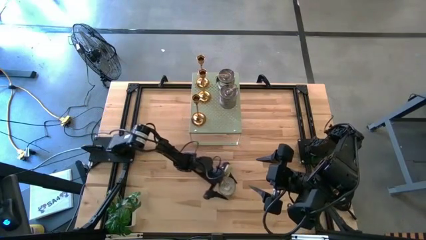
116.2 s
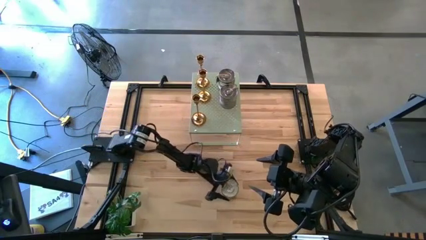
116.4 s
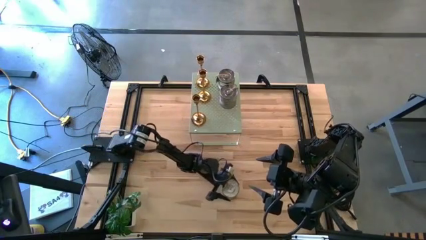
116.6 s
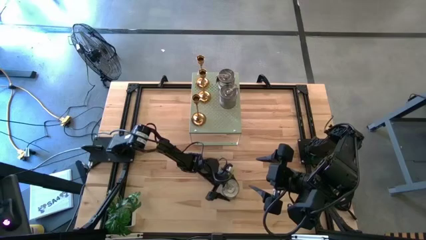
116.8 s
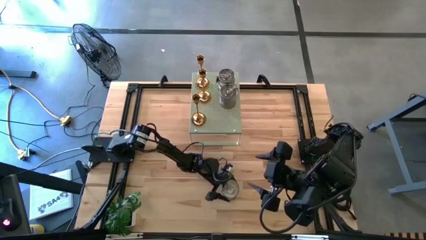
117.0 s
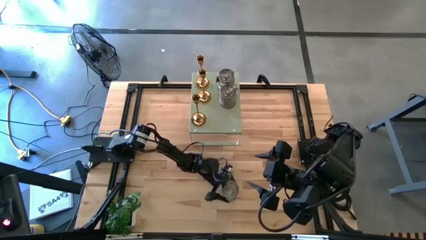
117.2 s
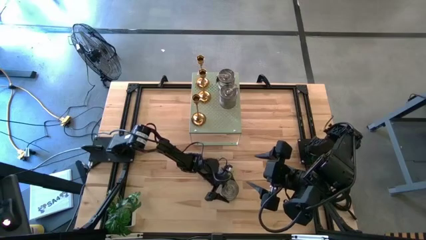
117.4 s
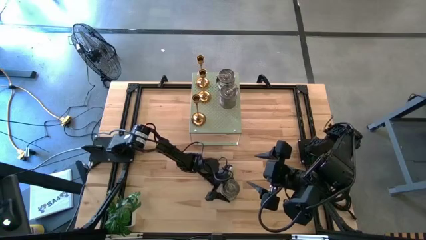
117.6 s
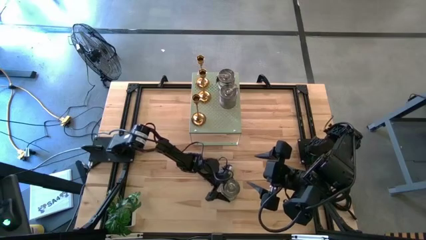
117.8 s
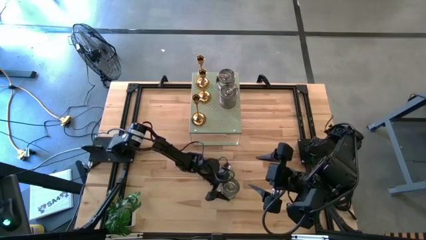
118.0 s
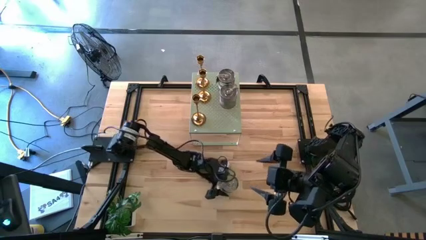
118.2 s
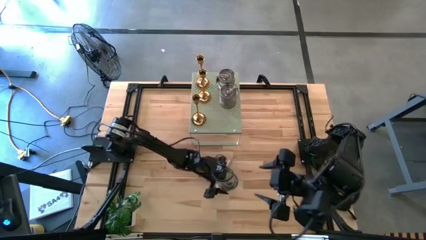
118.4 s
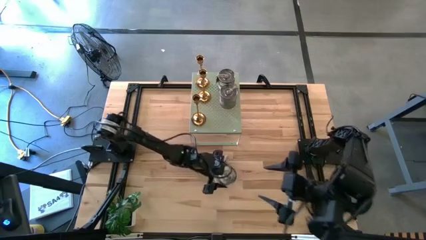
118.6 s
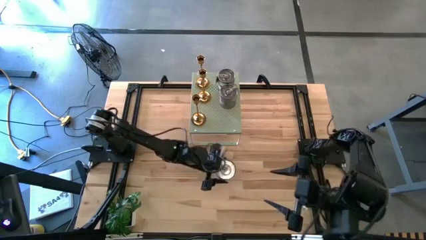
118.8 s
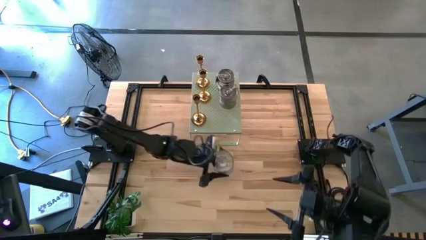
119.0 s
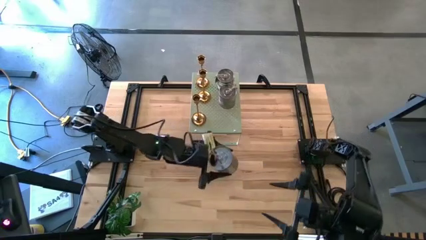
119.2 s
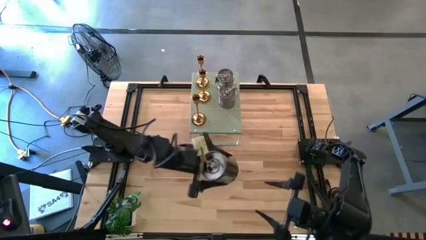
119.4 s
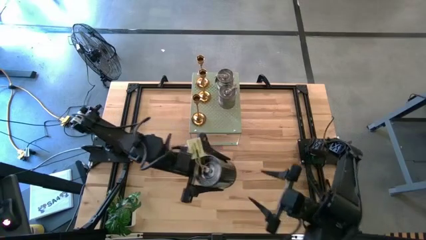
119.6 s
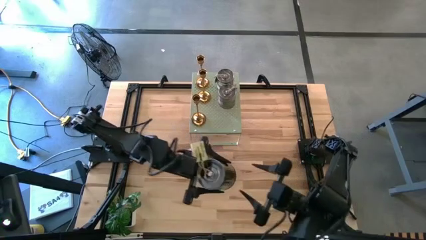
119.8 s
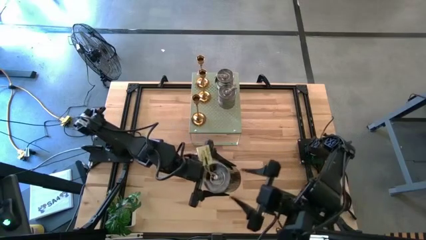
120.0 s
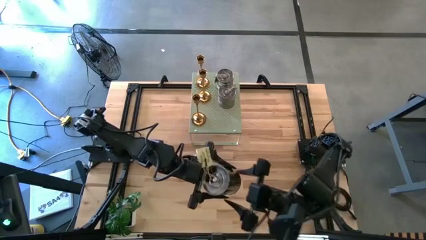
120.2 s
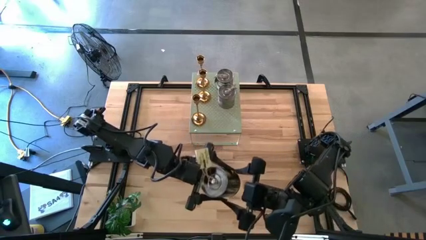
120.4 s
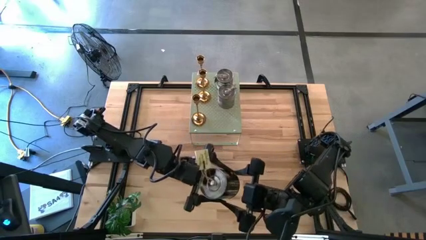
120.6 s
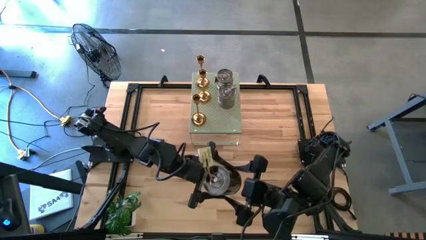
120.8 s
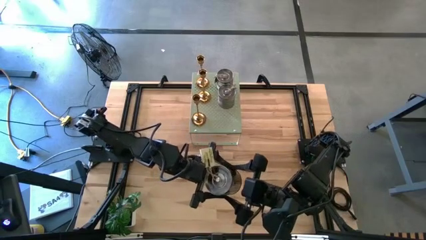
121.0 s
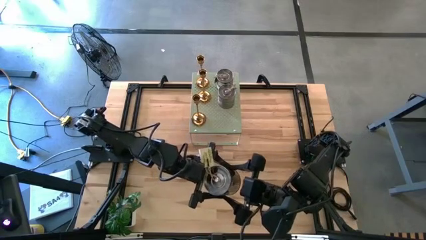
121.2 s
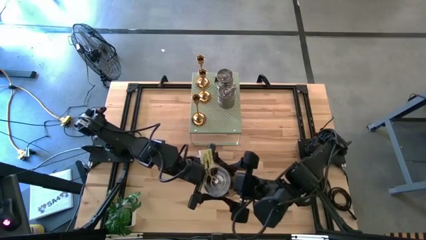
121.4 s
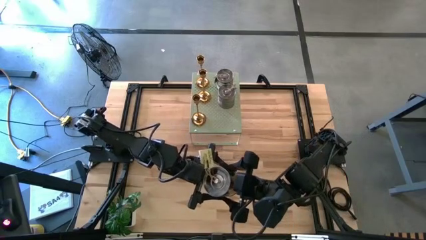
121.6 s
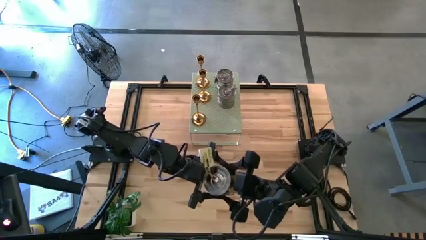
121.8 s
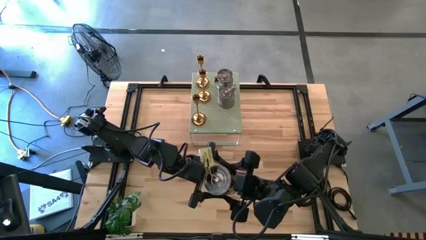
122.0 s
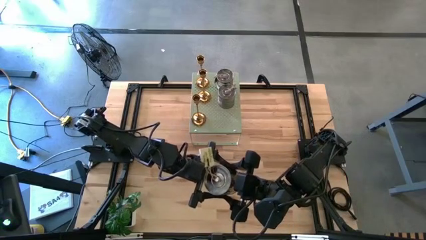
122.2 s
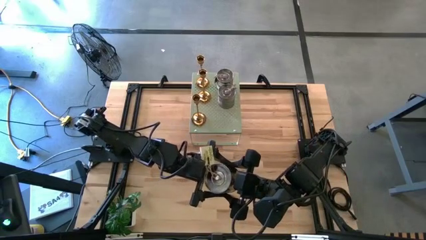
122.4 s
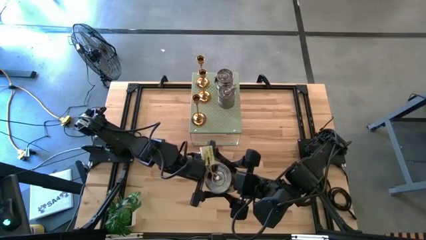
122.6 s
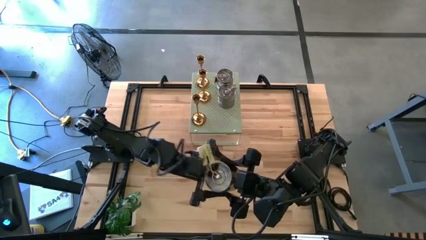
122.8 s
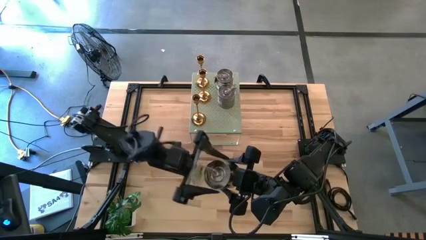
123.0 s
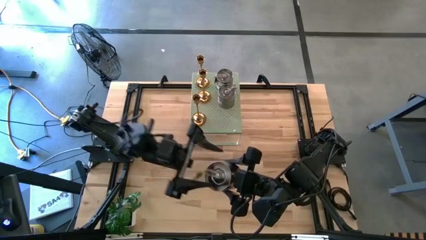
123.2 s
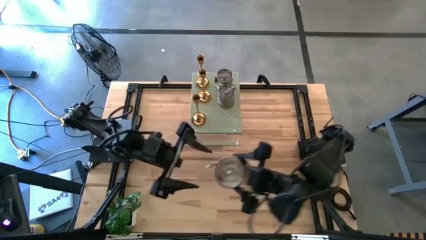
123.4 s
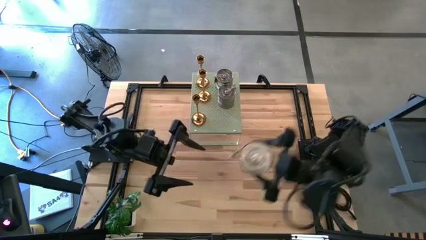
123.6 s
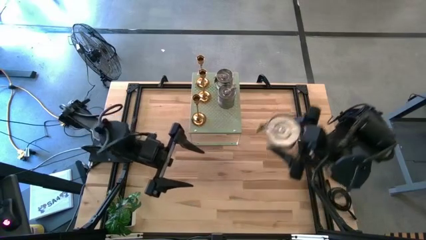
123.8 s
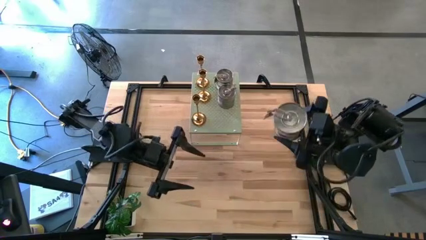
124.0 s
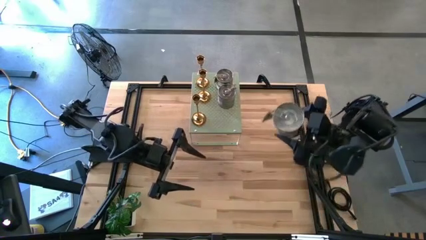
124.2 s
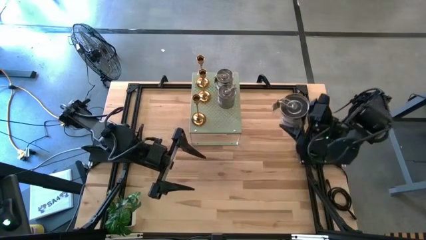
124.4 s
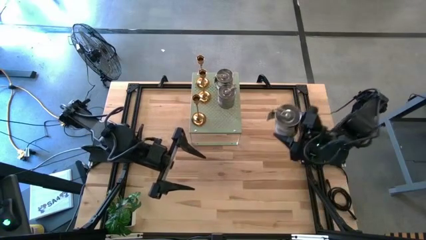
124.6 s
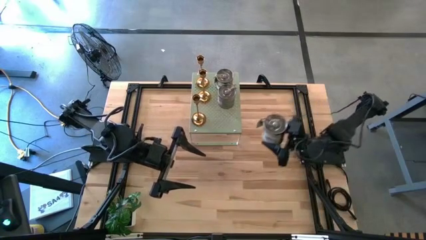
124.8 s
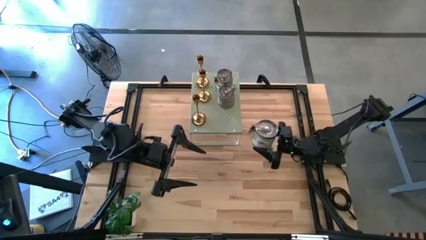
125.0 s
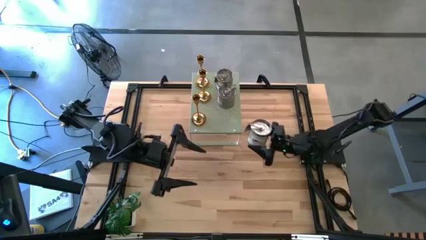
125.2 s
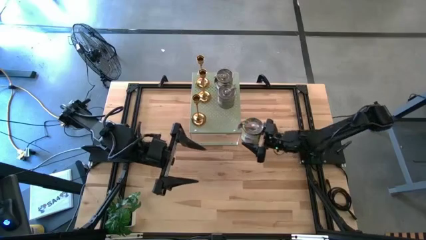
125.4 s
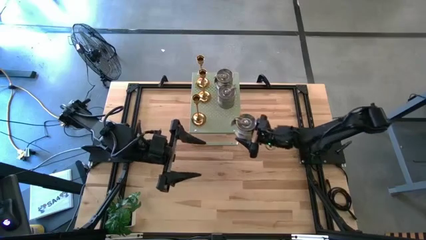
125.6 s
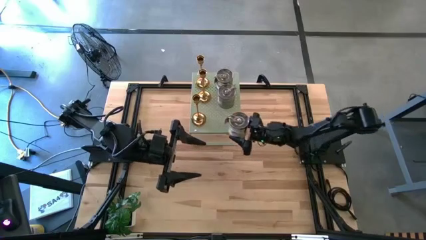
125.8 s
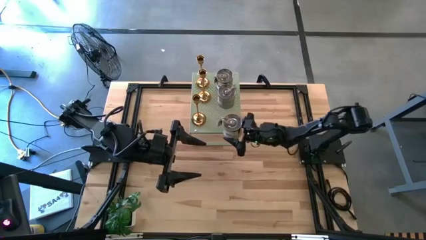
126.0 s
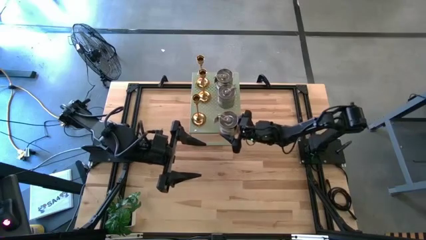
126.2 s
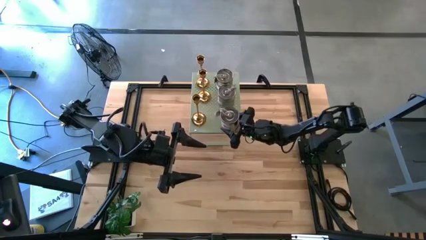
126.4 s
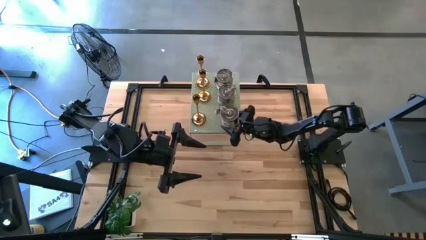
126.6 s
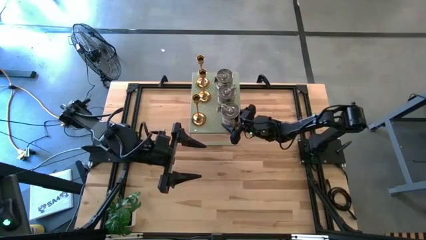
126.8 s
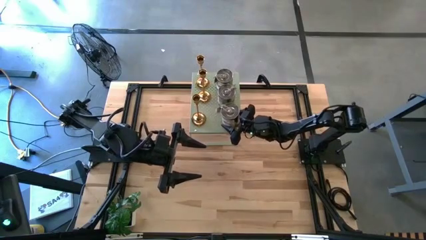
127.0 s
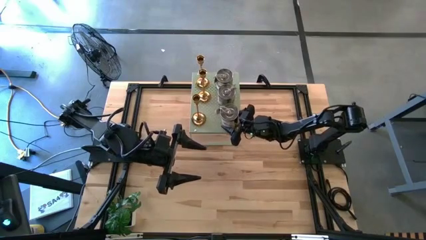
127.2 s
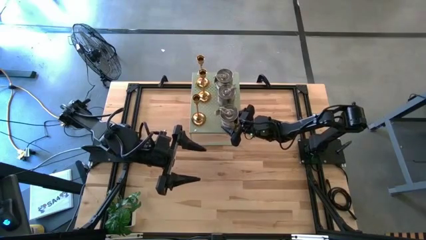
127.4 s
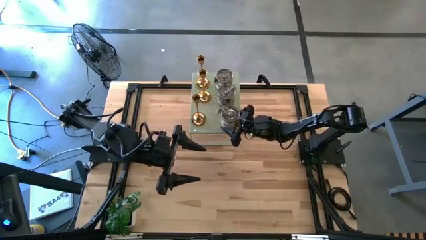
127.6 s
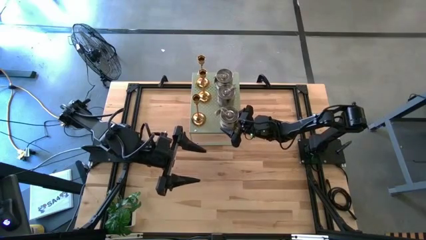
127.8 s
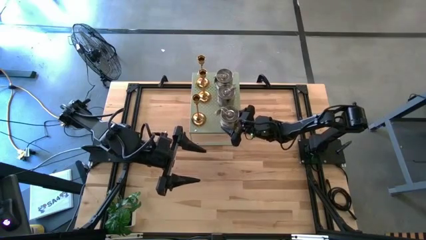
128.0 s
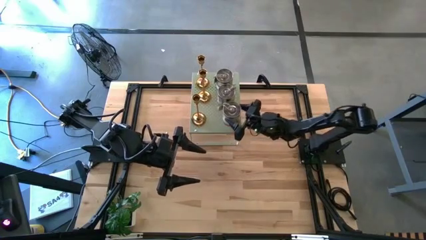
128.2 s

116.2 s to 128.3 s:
Task: Pick & Place candle stick holders
Put the green scented candle on the shelf aligned with the other brown scented candle

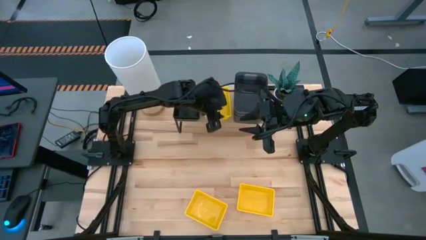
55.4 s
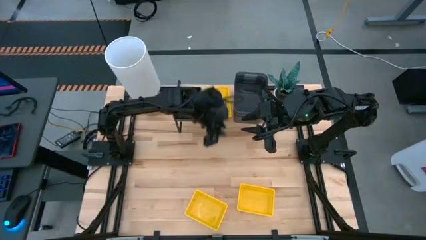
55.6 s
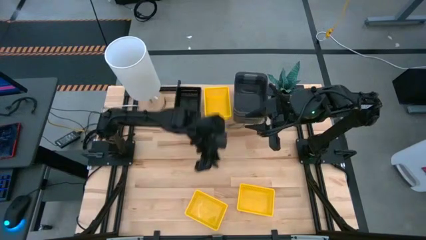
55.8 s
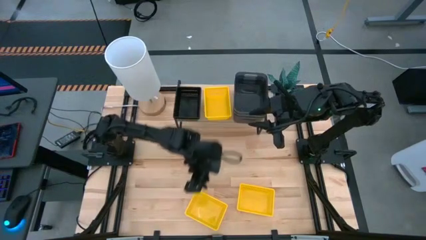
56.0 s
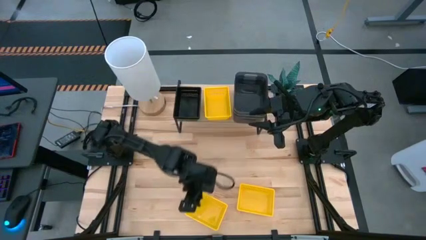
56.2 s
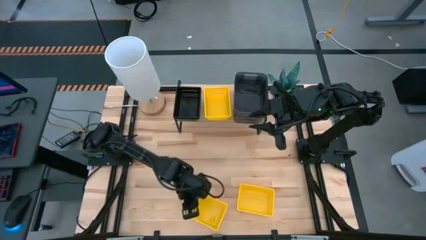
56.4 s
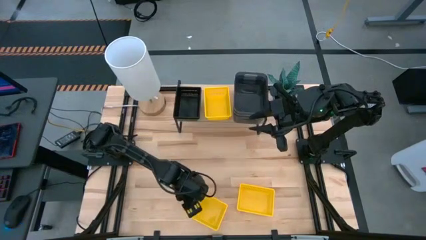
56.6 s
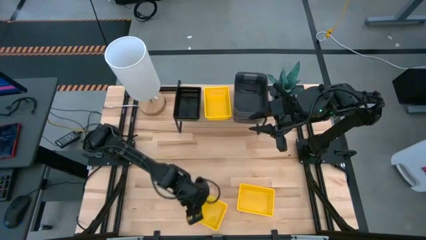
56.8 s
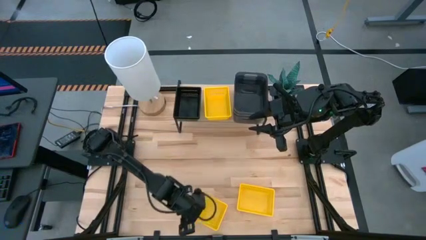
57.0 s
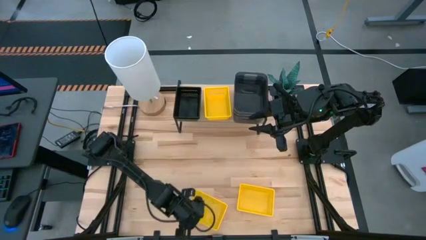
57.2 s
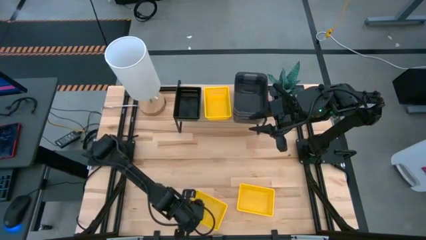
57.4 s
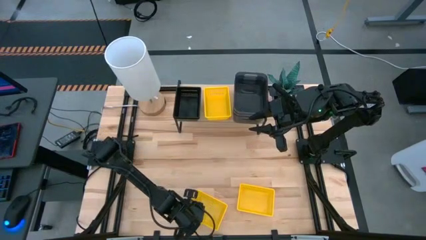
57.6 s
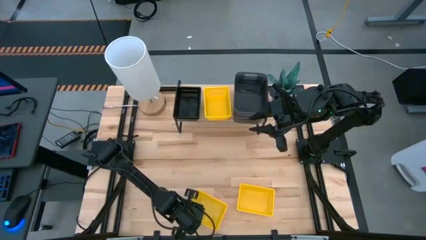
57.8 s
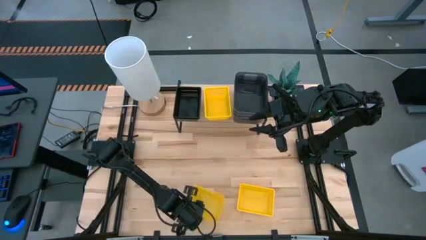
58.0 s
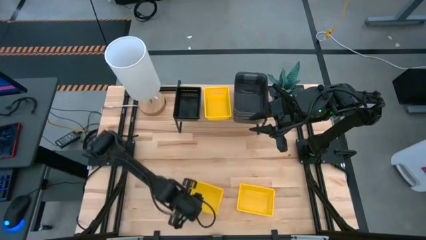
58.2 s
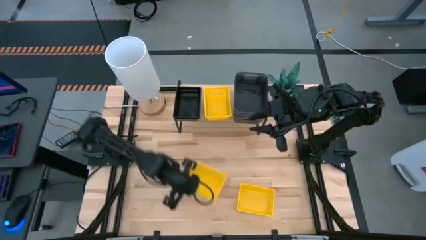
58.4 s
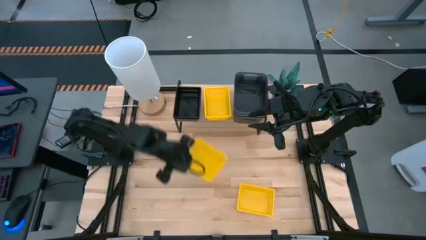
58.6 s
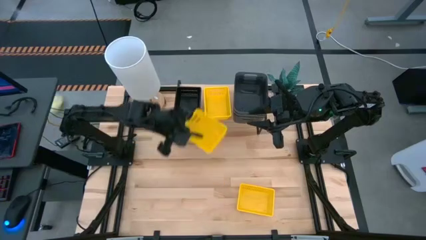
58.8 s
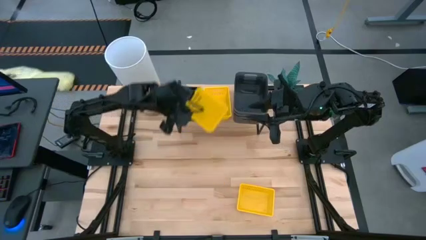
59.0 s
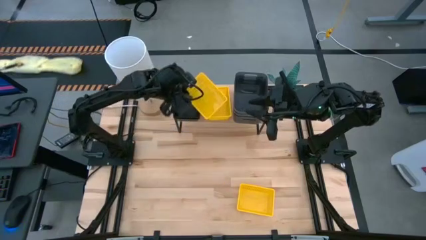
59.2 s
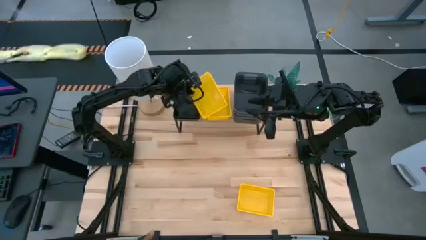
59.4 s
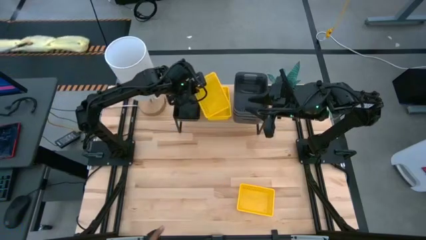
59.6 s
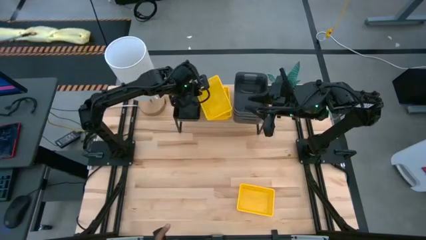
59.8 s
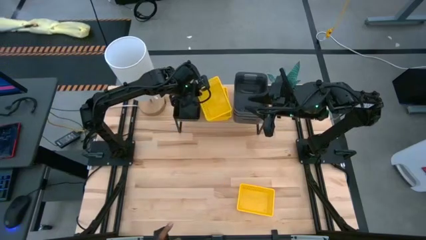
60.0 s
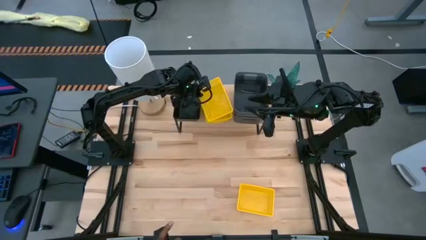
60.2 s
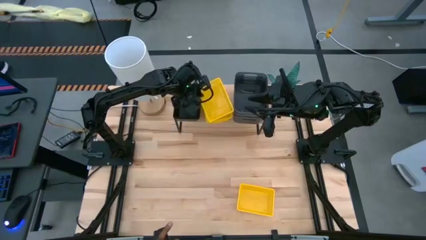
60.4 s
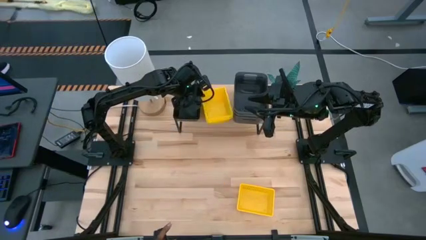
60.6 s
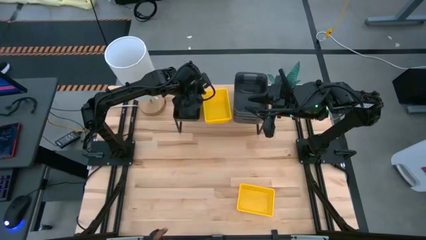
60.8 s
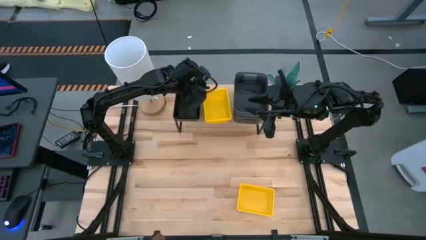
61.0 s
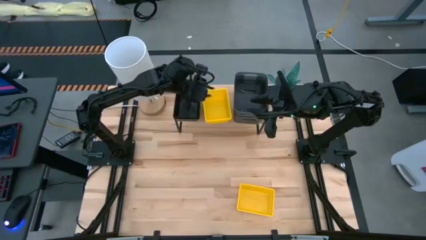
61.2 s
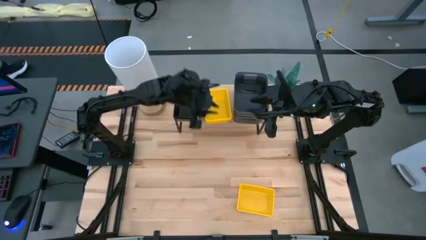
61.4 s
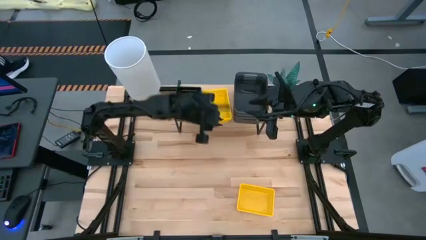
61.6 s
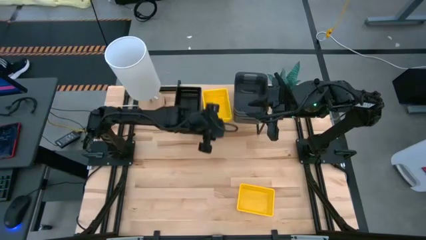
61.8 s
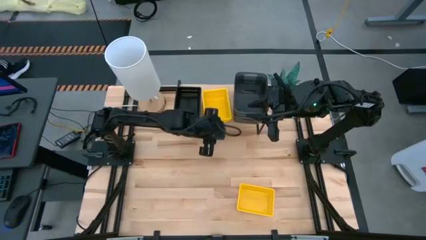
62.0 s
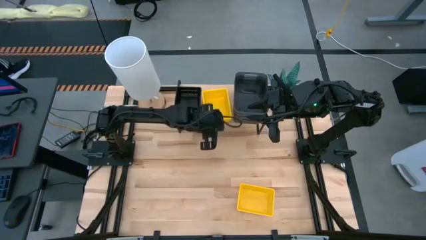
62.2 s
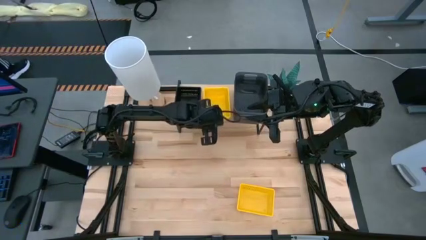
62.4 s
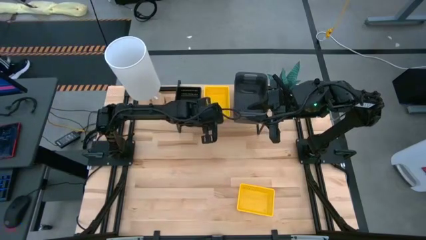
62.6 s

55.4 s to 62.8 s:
Task: Stack baskets on shelf by color
Stack the left yellow basket on top of the yellow basket on the shelf
